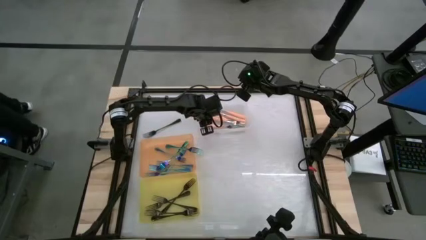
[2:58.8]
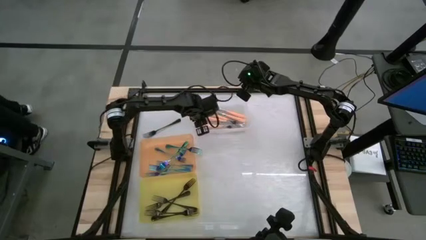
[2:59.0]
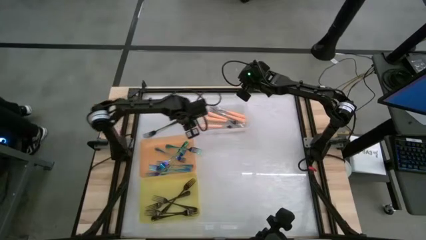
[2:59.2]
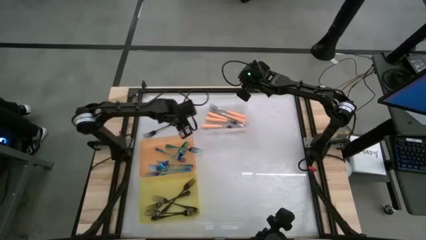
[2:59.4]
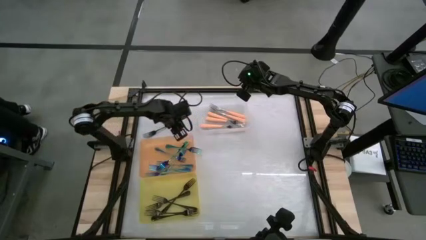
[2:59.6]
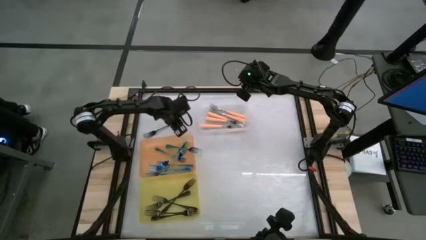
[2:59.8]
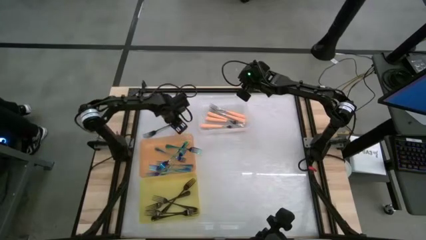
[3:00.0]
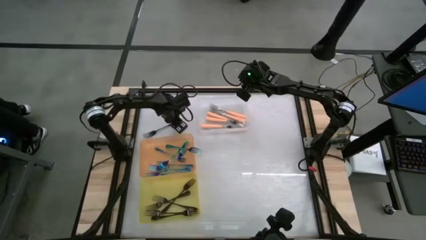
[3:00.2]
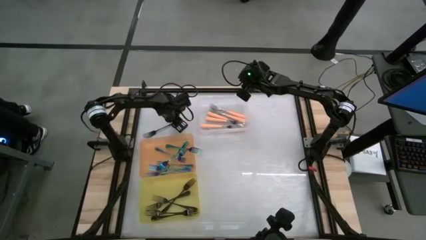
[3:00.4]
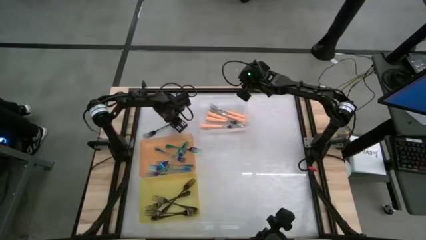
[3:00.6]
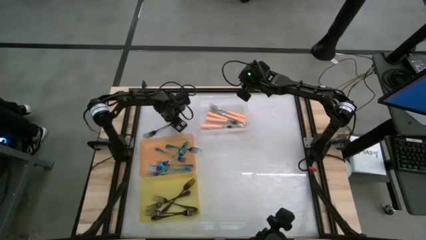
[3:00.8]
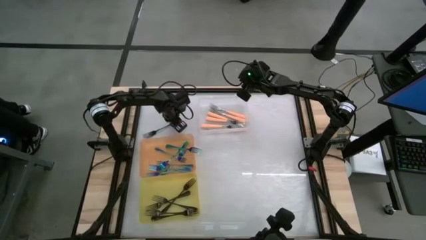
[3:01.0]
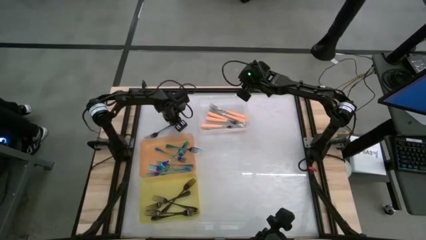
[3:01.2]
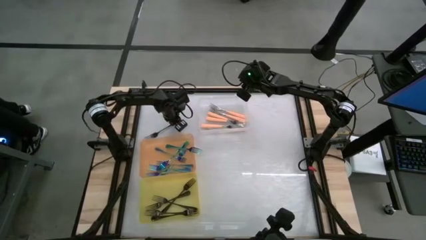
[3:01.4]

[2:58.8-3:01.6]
Task: Sort silverware by color (type)
Put the black fork into the yellow bin

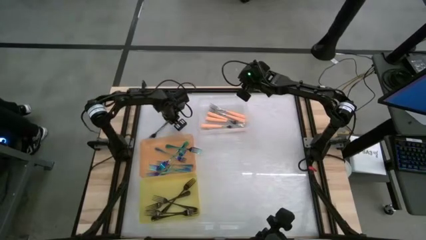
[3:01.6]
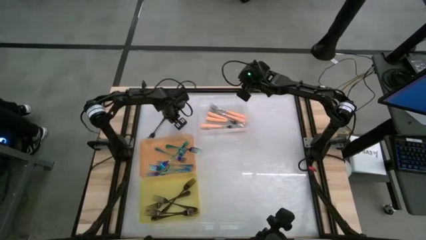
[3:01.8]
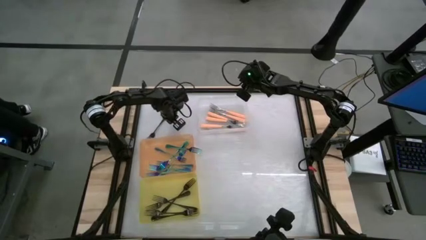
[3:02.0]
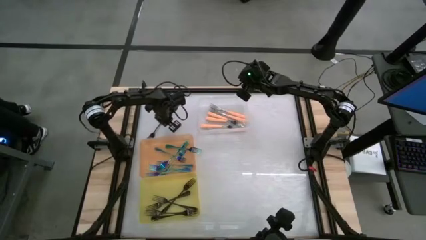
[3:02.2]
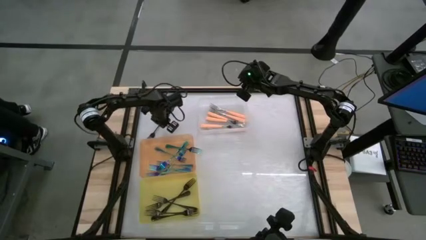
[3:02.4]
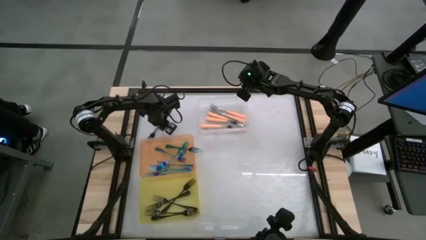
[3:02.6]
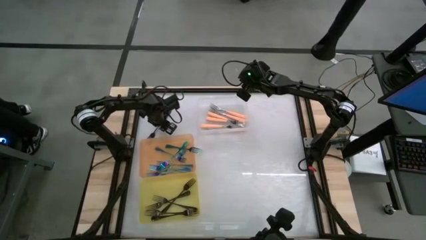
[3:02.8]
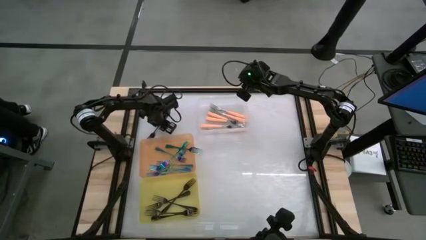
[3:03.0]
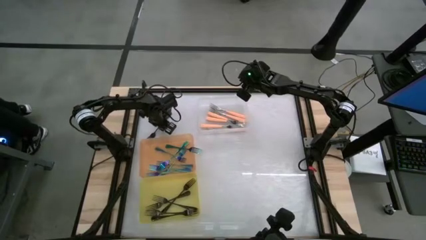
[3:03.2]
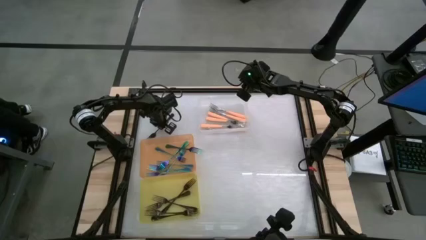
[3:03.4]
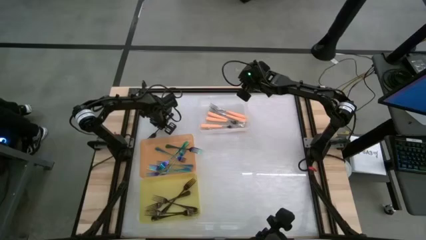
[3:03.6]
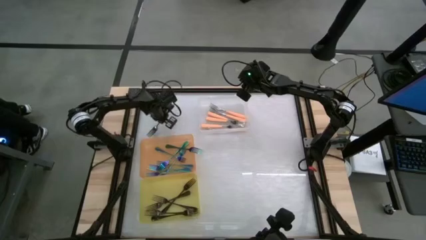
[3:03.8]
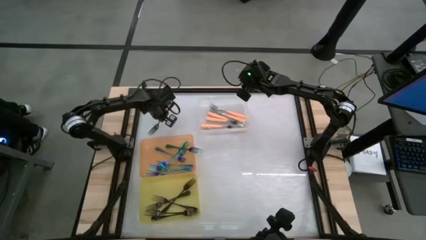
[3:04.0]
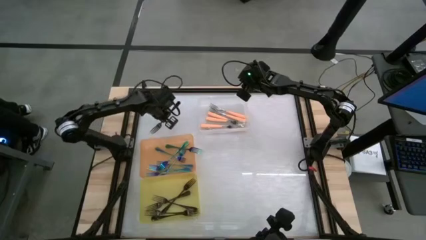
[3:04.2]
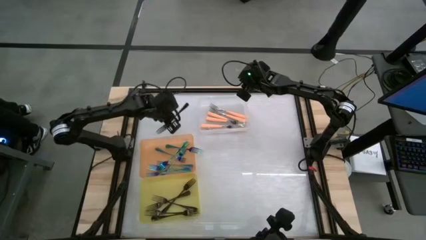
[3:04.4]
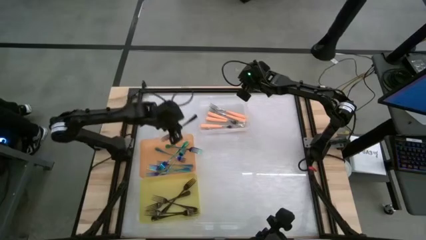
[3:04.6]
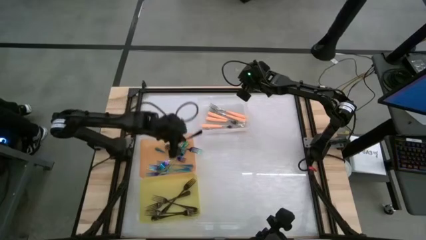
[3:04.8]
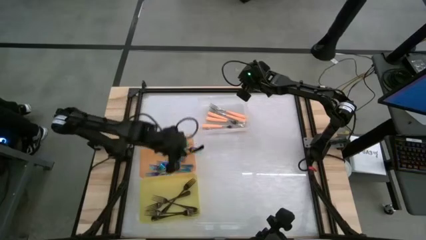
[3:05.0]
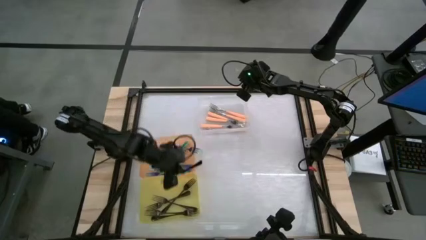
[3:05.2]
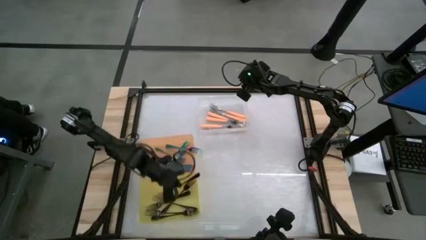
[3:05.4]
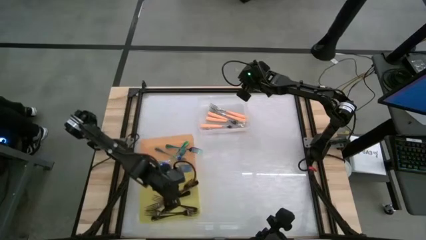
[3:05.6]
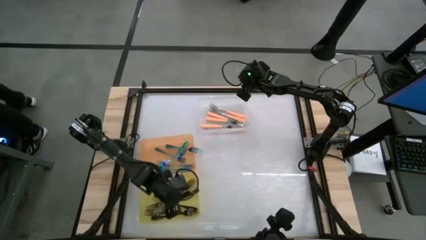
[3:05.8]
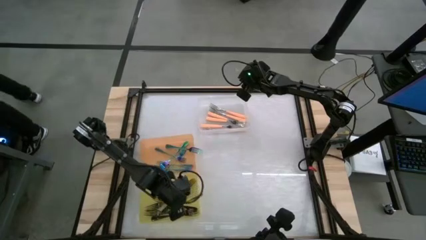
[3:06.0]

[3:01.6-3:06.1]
Put the black fork into the yellow bin

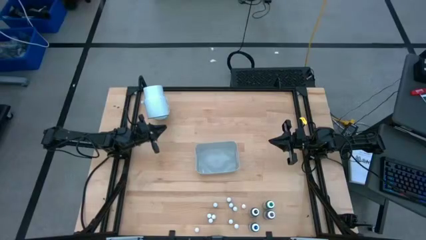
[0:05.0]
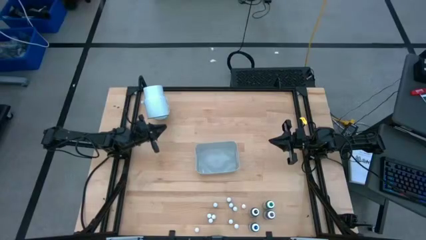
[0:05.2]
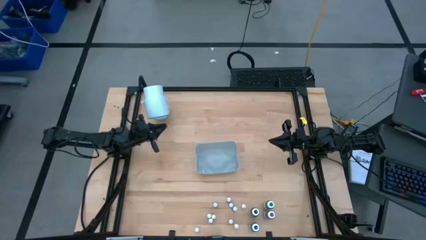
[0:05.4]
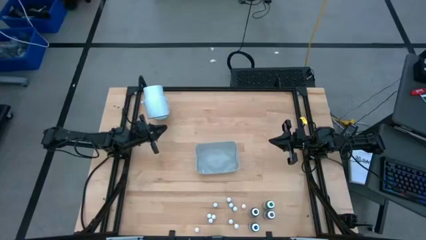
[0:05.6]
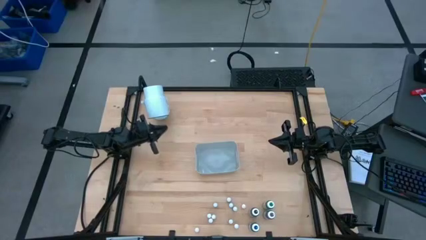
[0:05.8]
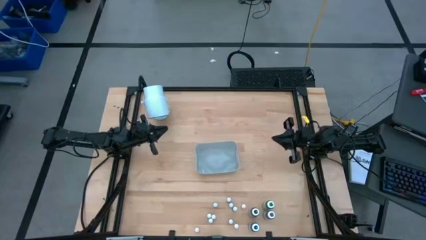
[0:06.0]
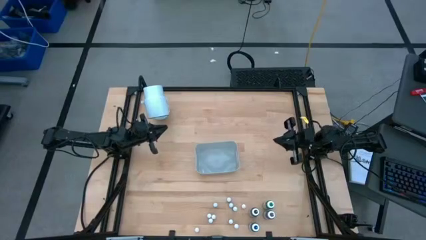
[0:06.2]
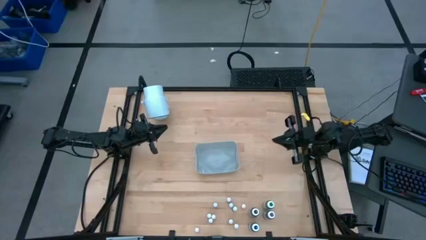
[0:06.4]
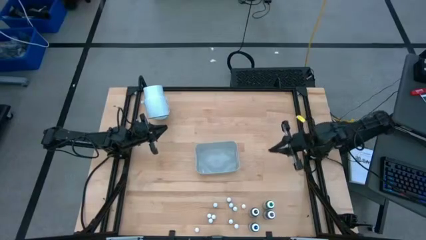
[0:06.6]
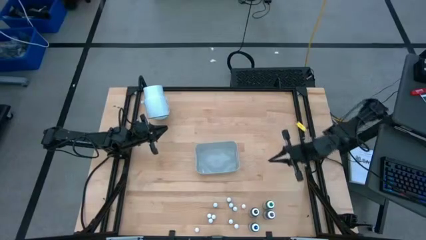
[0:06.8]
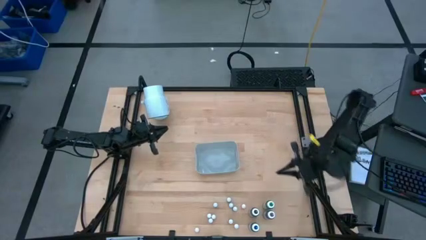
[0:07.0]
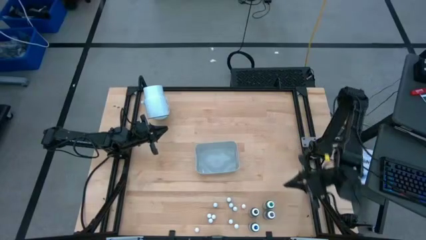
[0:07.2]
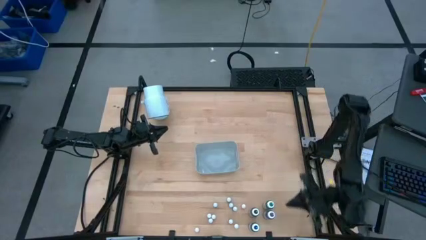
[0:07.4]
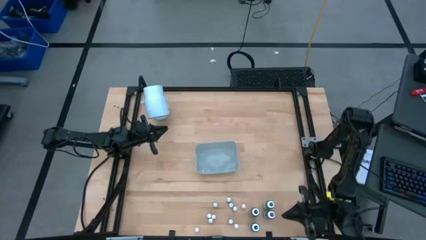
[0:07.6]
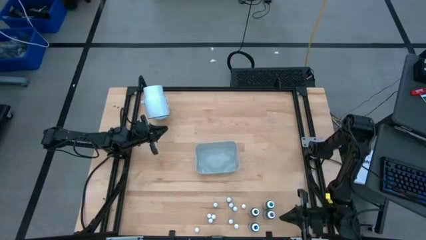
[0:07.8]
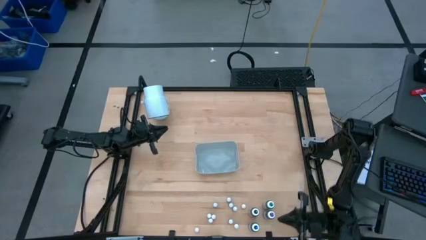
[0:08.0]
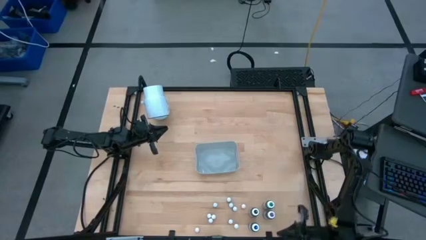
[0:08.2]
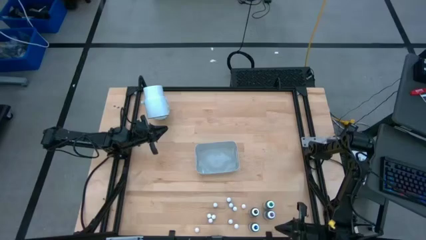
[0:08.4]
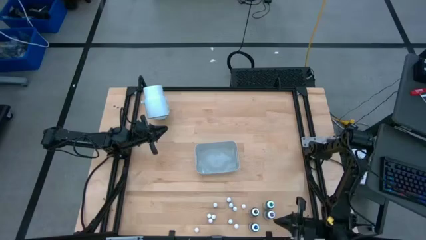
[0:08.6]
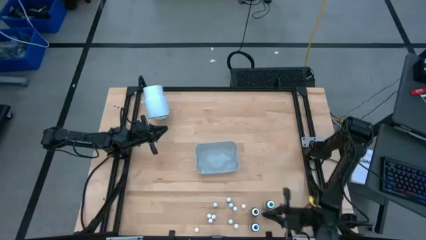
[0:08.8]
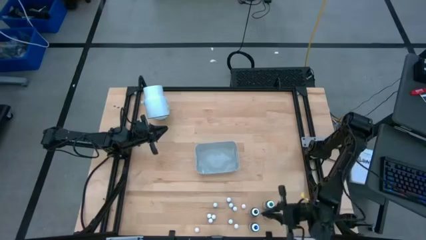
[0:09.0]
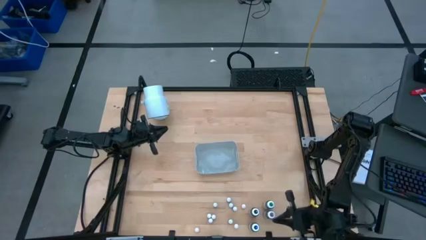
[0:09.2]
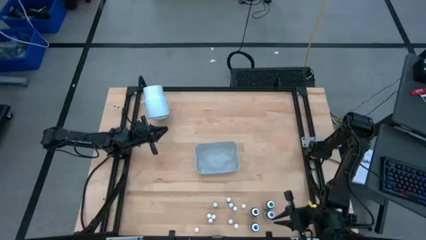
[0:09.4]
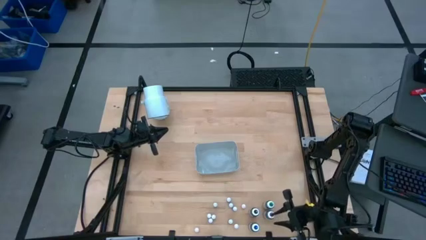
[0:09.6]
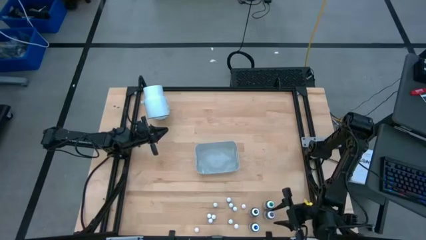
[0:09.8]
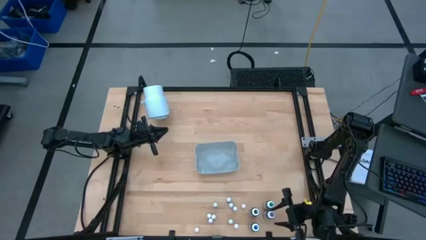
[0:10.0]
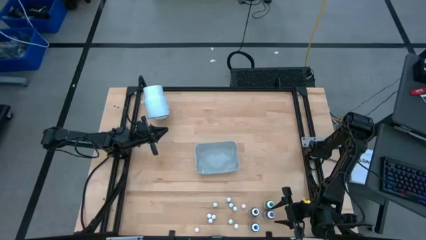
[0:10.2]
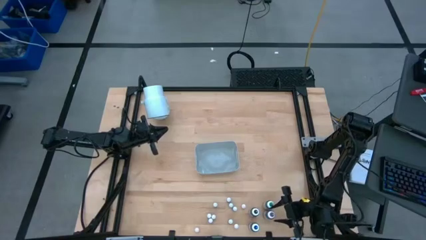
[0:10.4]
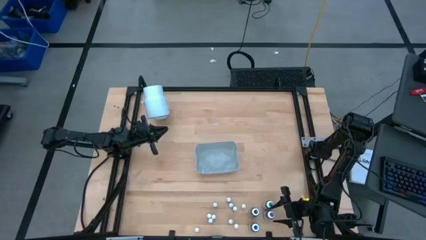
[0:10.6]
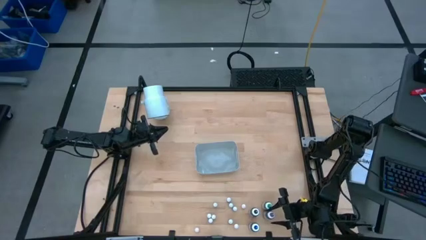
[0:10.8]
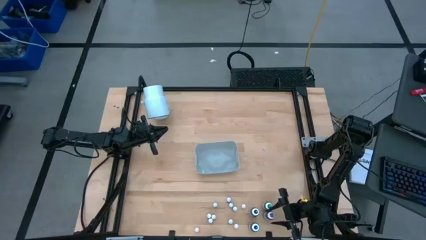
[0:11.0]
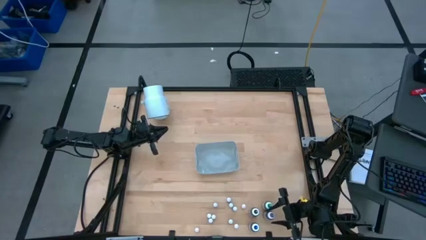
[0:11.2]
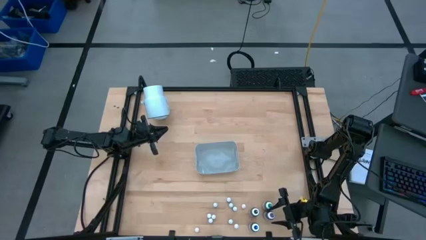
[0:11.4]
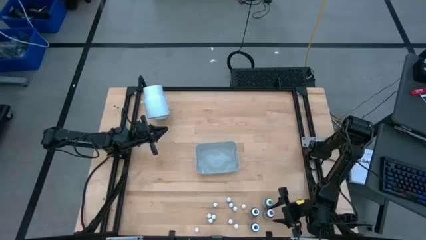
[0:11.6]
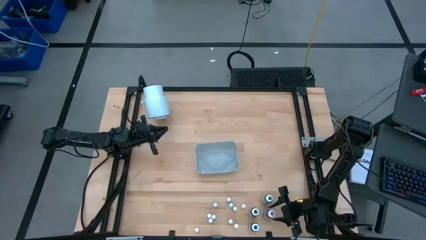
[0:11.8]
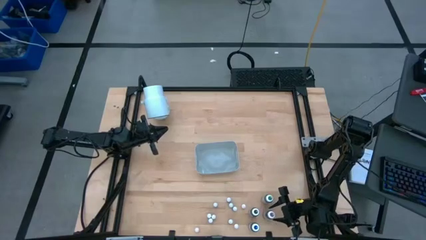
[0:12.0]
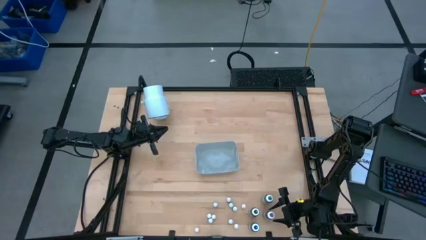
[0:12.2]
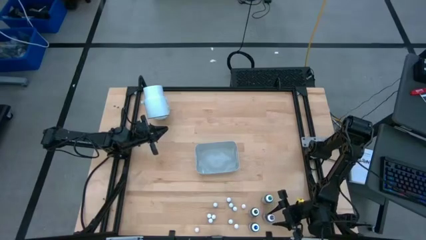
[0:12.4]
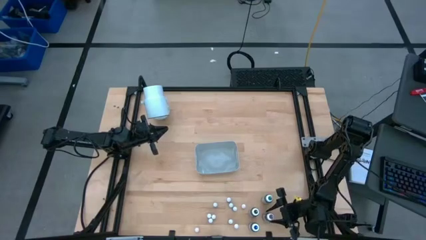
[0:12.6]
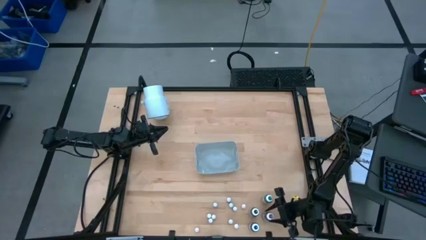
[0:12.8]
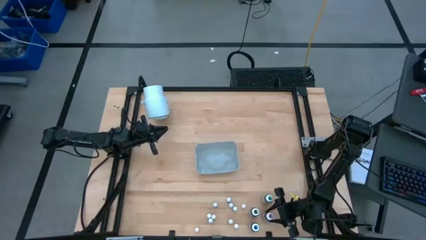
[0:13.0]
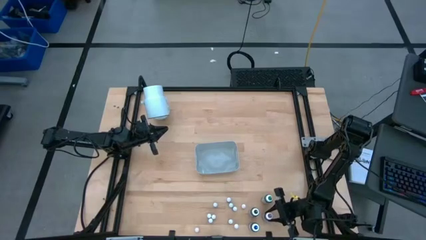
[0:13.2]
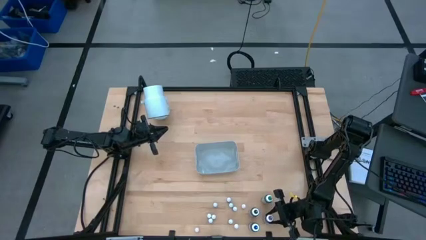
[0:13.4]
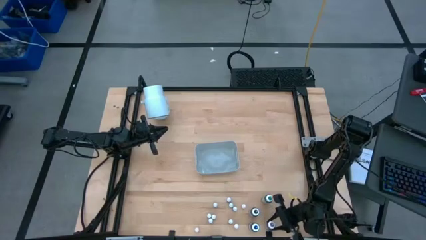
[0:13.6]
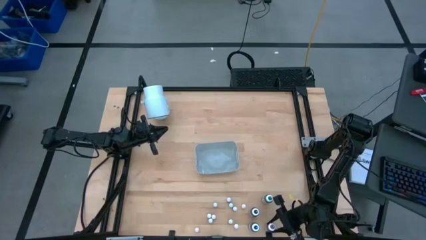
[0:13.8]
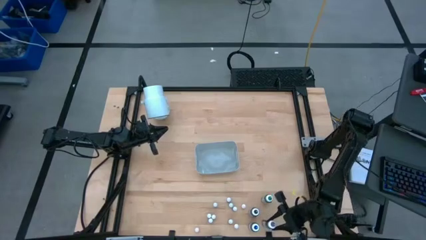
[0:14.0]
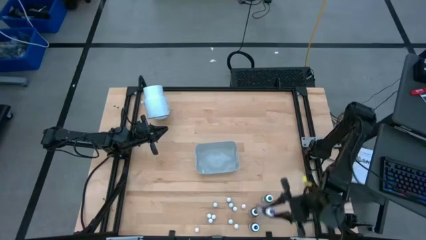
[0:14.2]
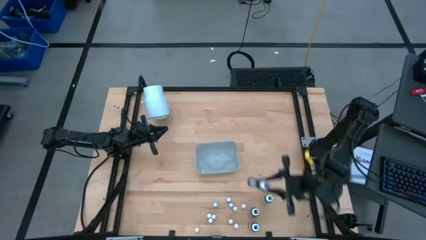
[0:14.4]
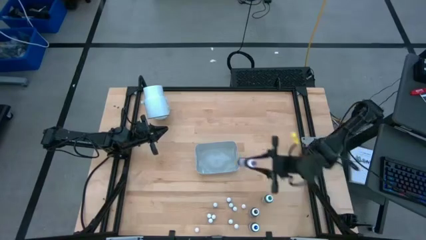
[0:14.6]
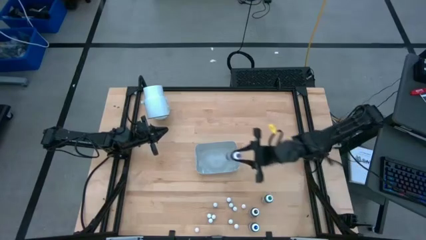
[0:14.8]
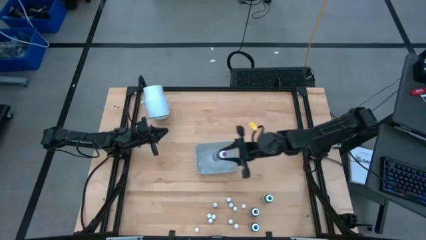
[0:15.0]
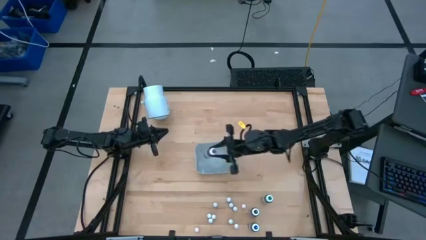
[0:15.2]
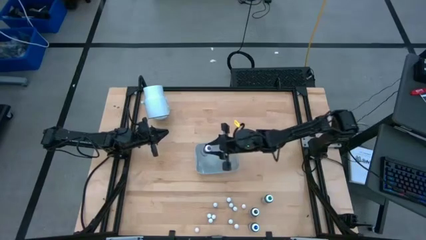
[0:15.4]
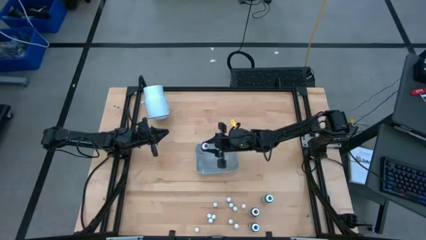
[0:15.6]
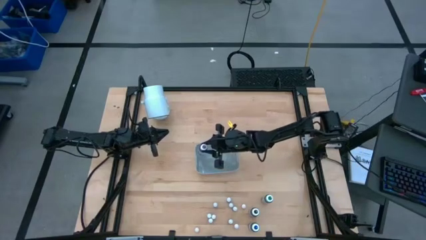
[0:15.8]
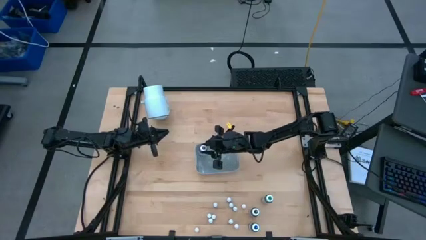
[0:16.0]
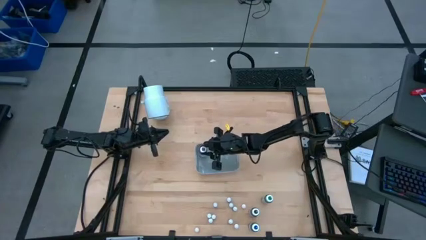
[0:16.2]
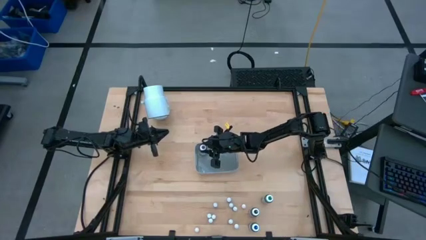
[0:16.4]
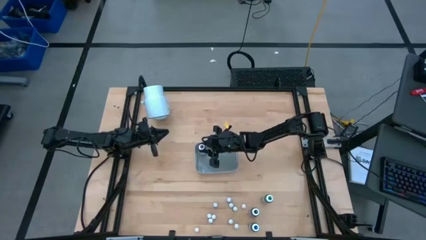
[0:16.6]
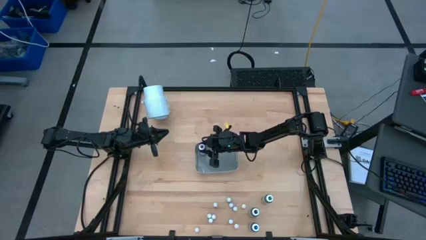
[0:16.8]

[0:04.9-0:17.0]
Task: Pick & Place food coloring
Put the large purple food coloring bottle into the bin
